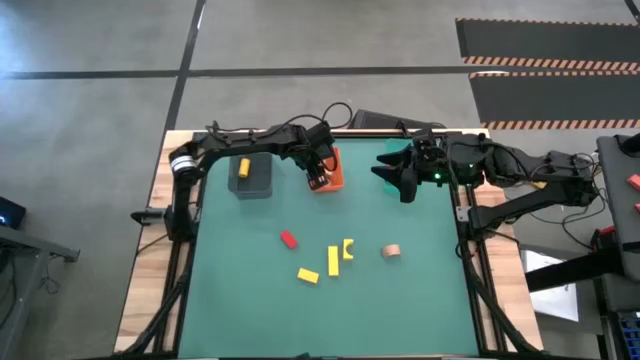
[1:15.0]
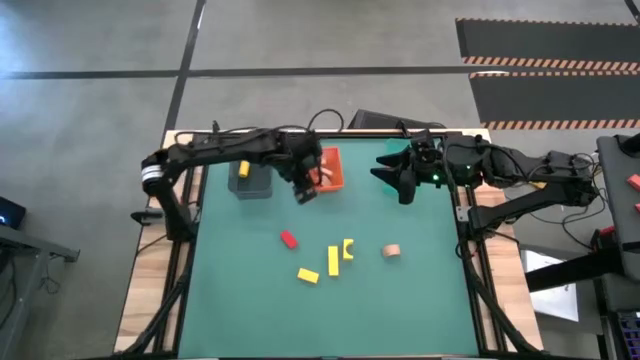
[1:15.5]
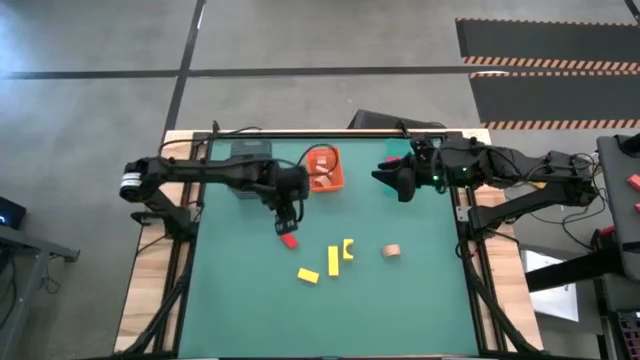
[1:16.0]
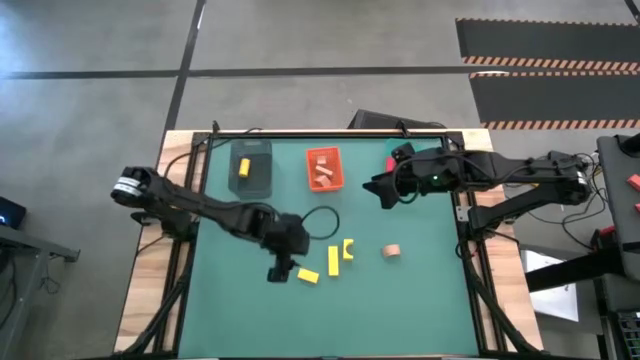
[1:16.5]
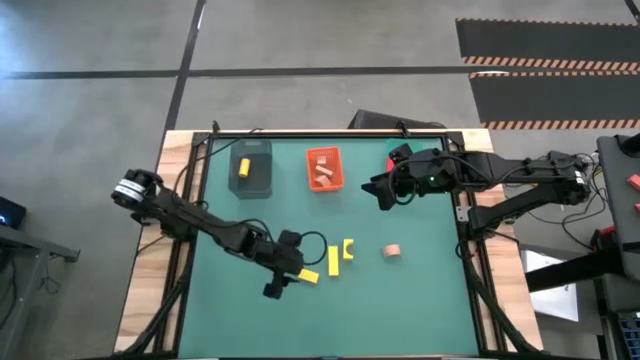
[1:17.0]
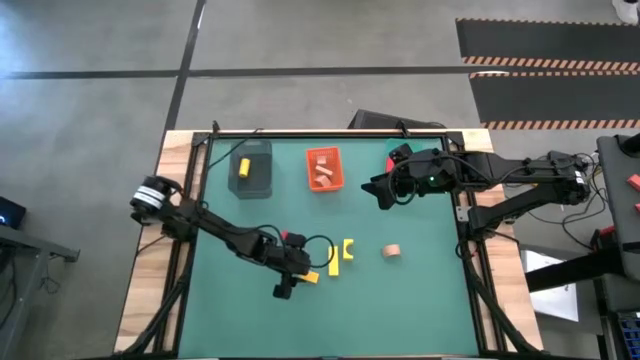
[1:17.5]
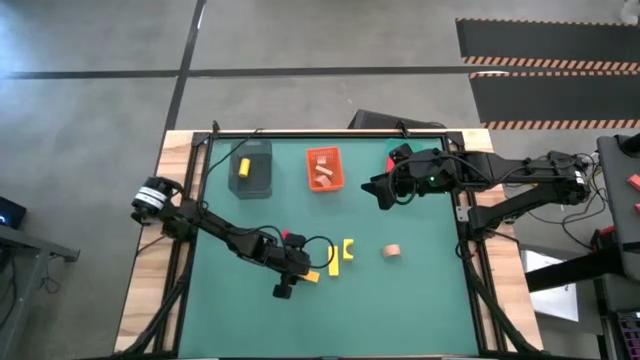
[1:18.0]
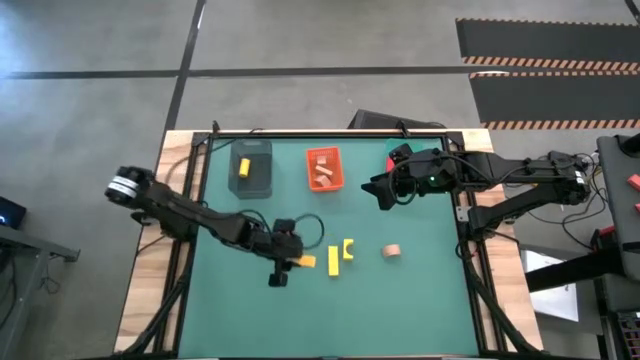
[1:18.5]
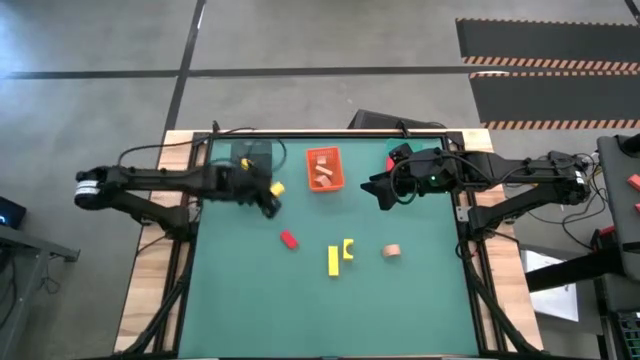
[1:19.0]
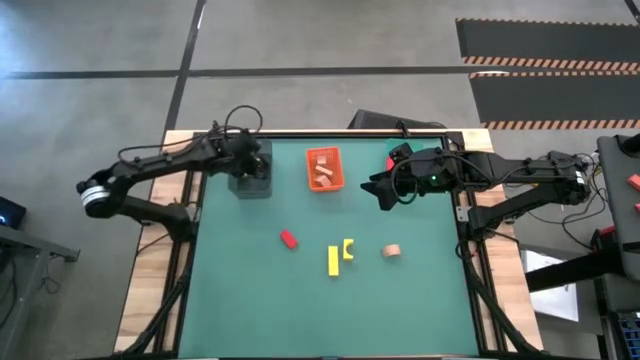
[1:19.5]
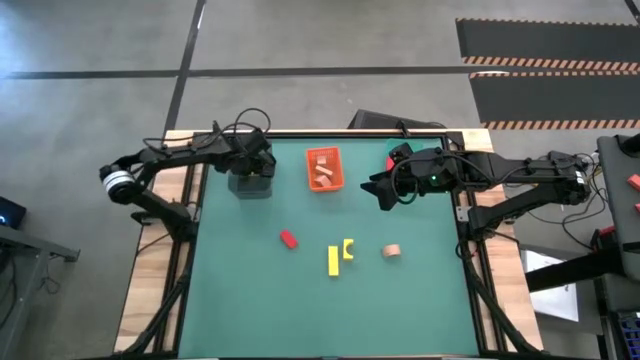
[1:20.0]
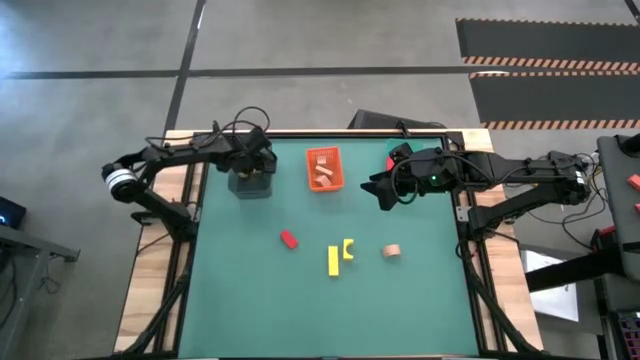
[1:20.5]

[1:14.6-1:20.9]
Task: Sort & place blocks by color
Put the yellow block into the black bin

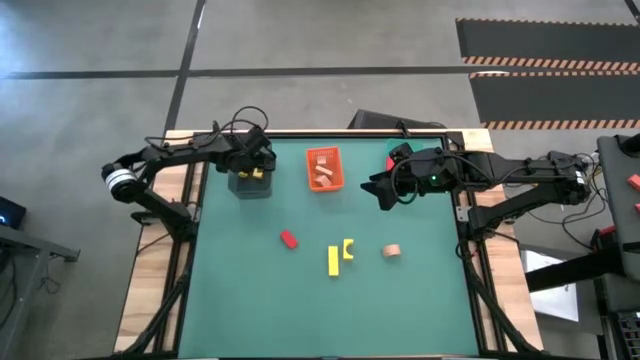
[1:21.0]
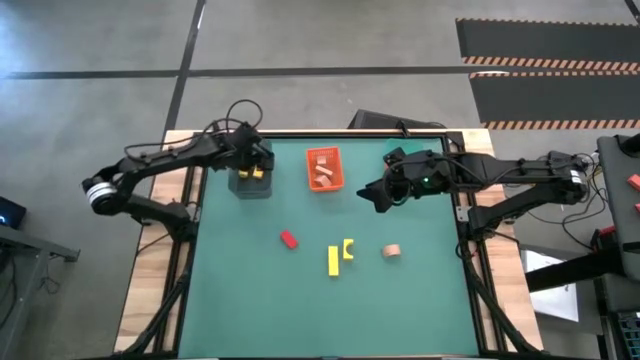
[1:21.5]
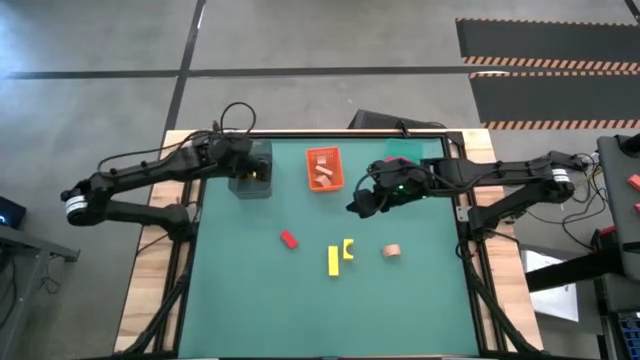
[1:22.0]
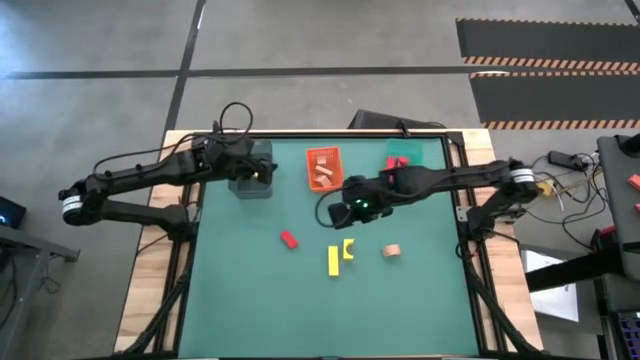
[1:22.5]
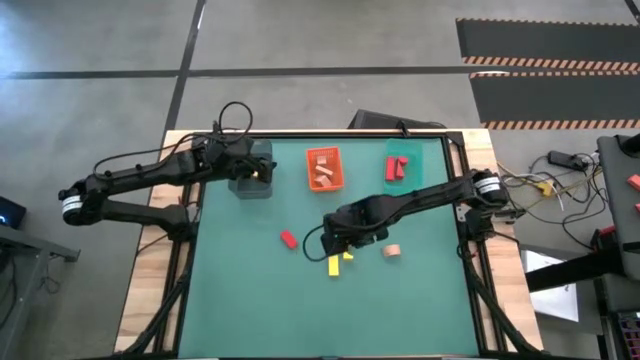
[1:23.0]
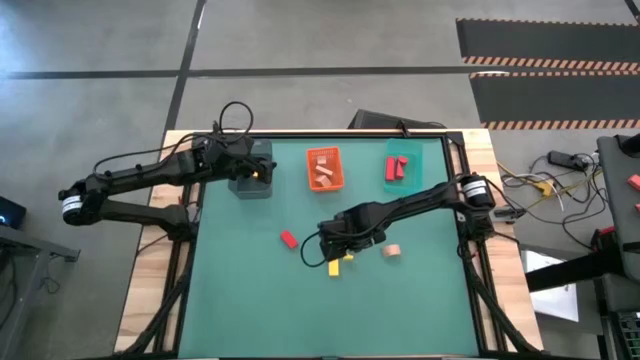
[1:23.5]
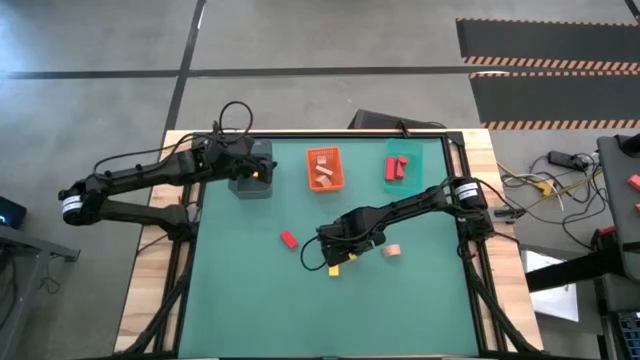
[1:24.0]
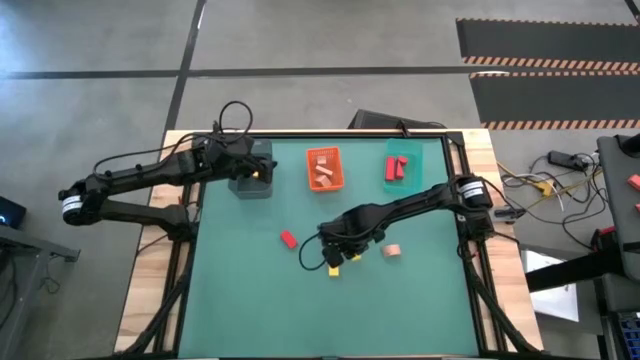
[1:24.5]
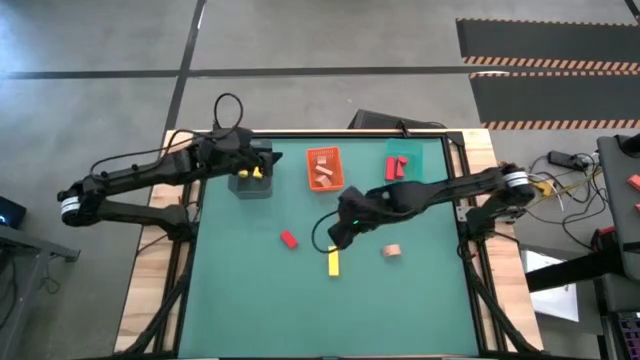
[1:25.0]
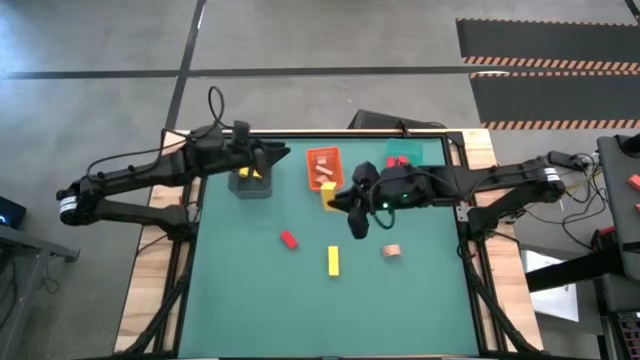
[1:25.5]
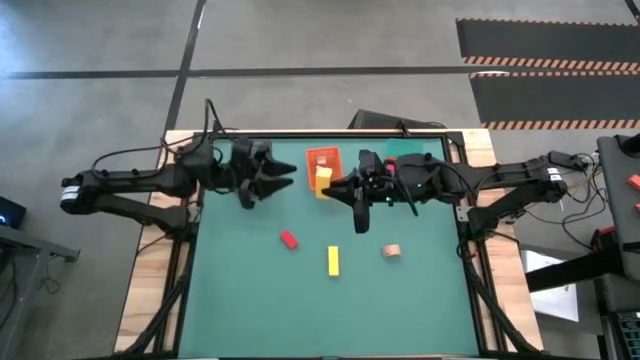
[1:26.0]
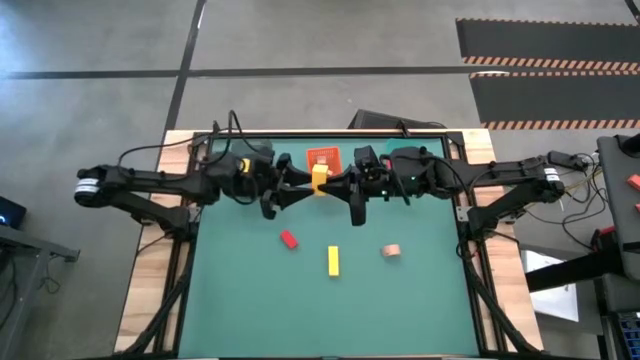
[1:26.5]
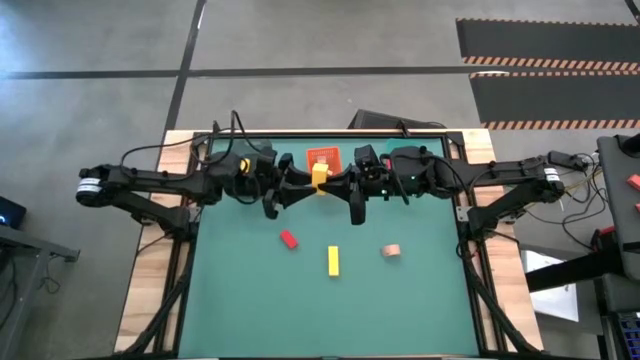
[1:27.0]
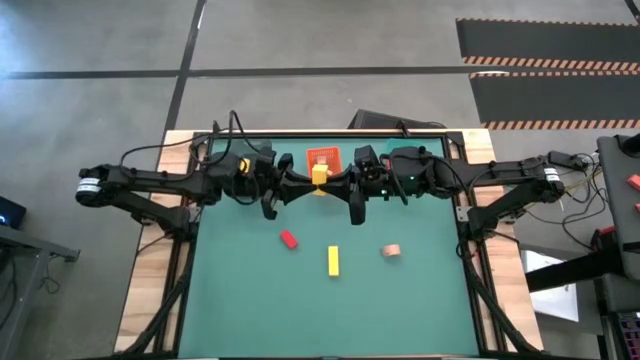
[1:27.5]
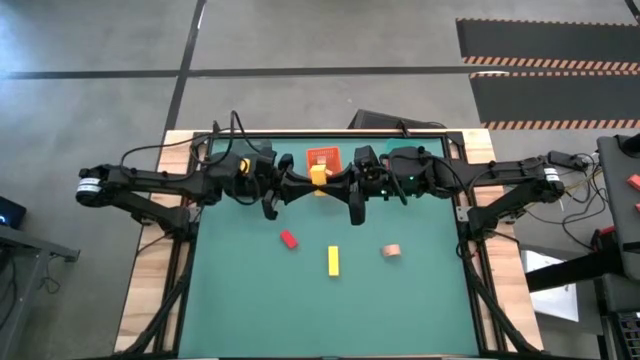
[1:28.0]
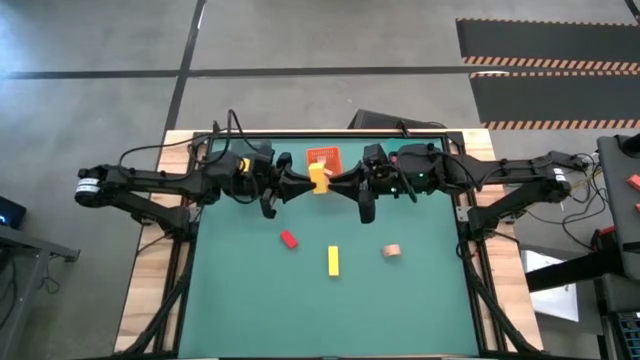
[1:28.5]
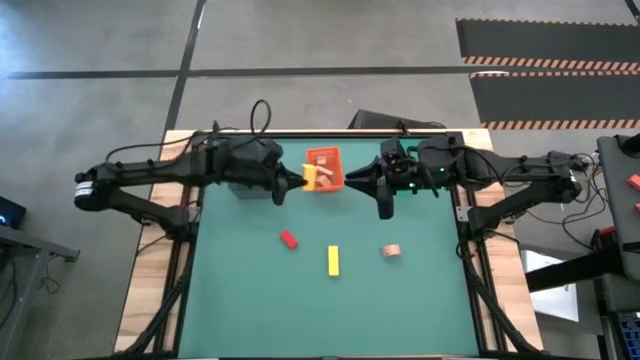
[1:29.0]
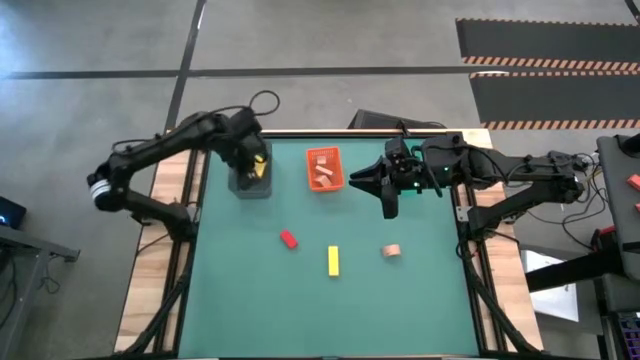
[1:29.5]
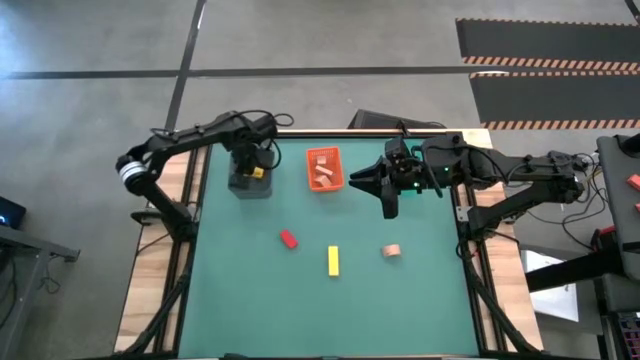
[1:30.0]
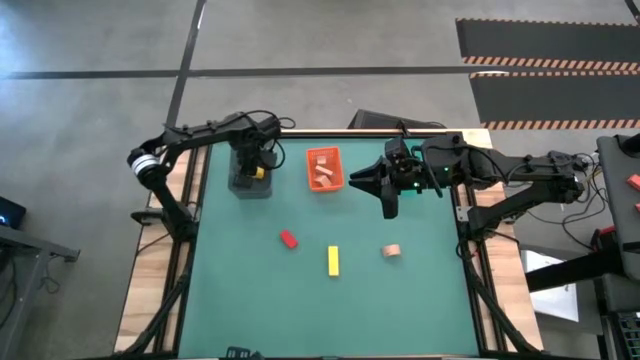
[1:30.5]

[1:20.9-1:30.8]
Put the yellow block into the black bin

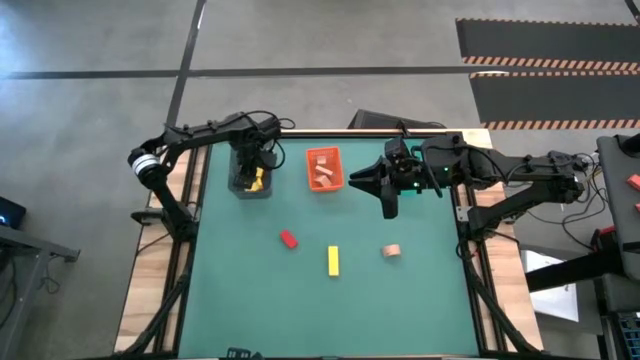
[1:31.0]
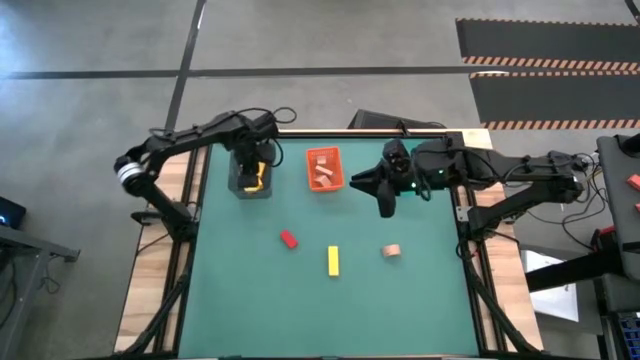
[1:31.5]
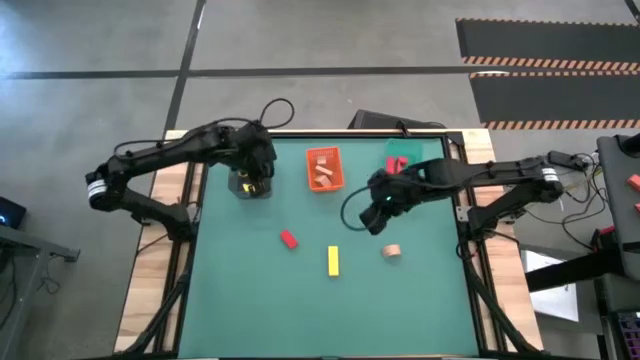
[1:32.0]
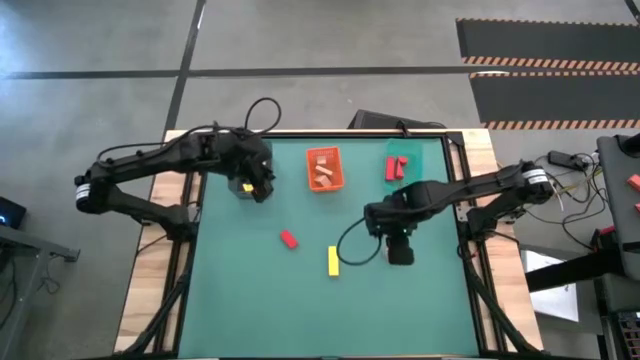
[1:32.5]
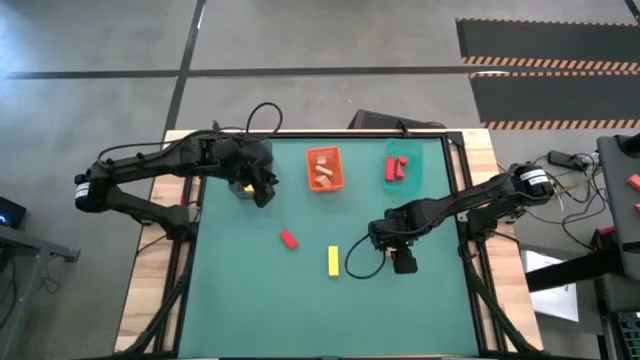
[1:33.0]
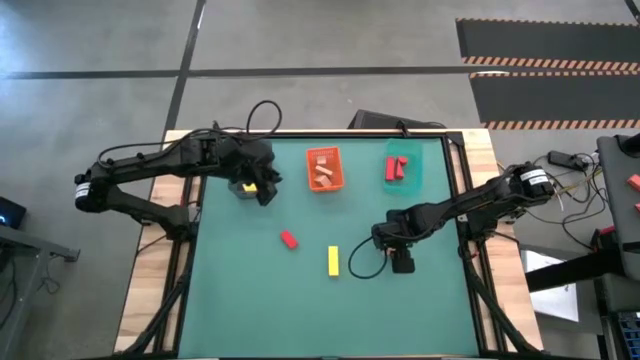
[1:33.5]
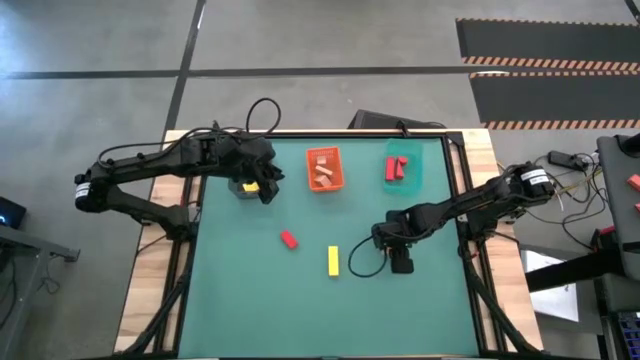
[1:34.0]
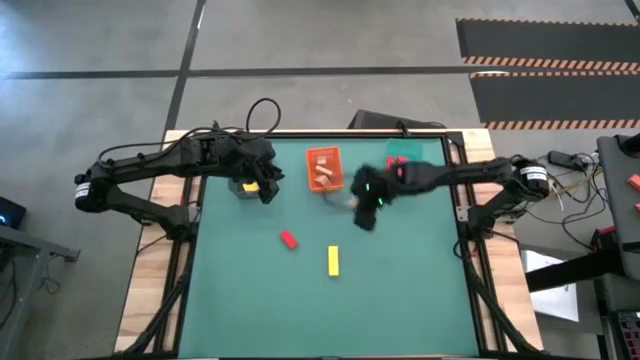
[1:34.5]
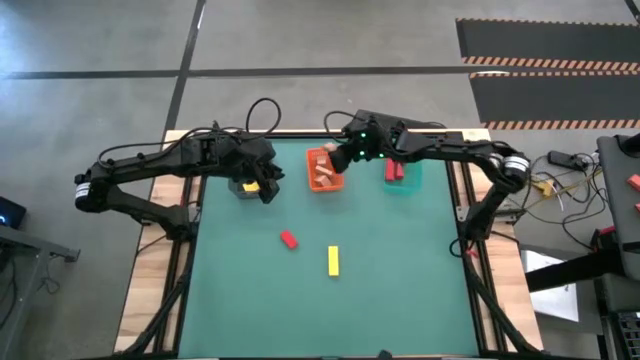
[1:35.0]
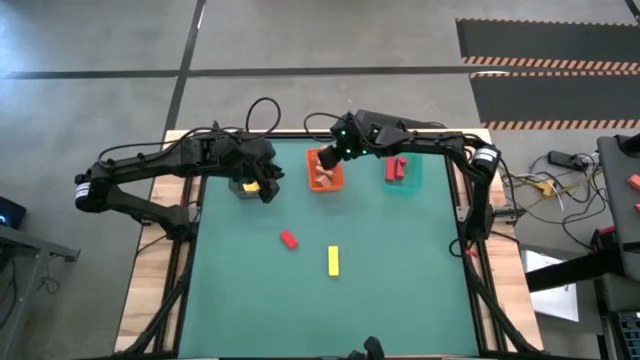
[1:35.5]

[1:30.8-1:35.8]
Put the brown block into the orange bin
